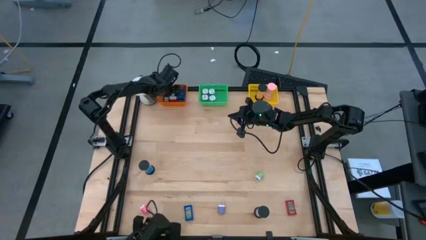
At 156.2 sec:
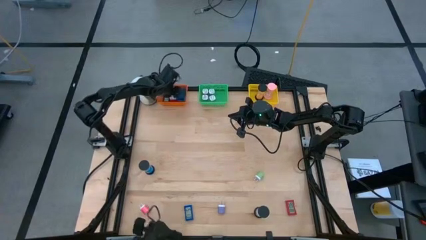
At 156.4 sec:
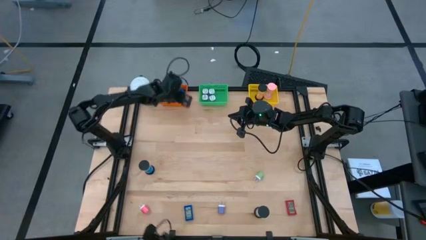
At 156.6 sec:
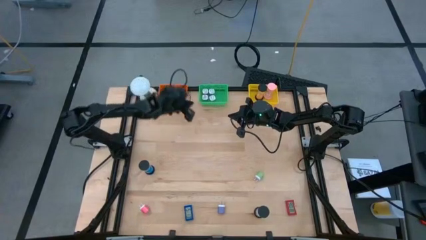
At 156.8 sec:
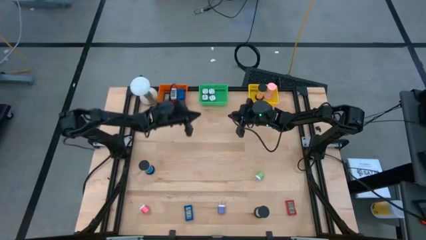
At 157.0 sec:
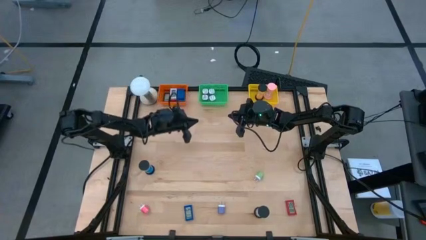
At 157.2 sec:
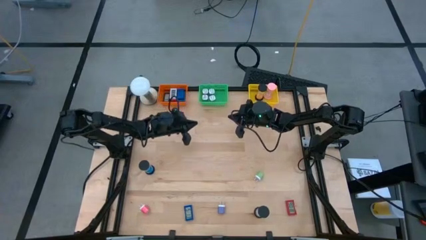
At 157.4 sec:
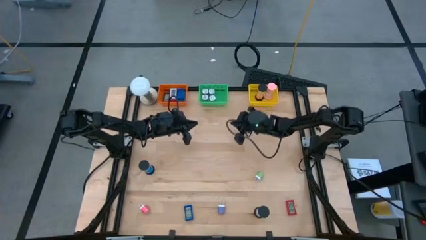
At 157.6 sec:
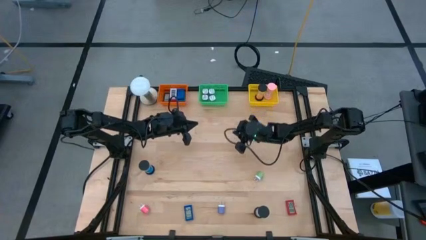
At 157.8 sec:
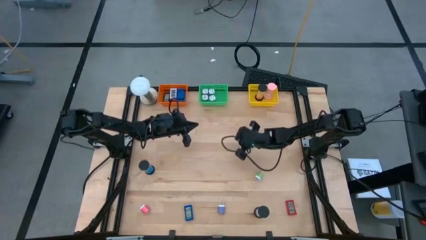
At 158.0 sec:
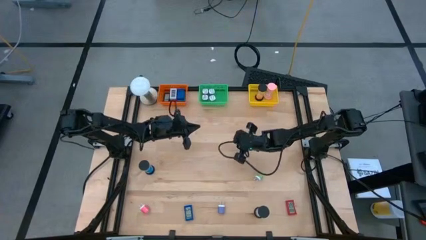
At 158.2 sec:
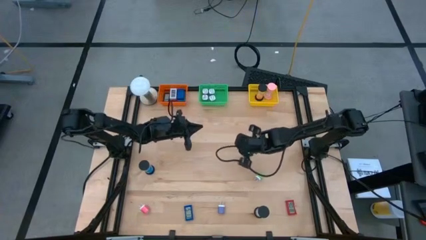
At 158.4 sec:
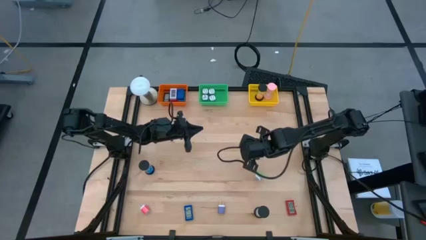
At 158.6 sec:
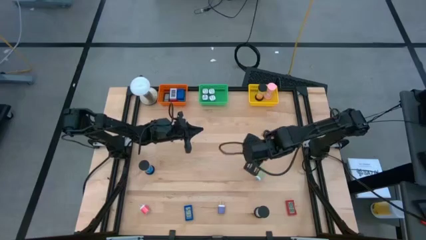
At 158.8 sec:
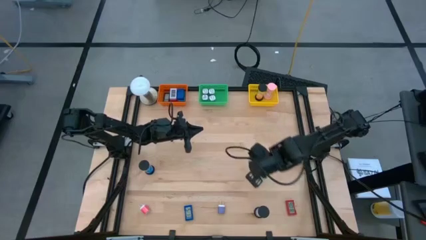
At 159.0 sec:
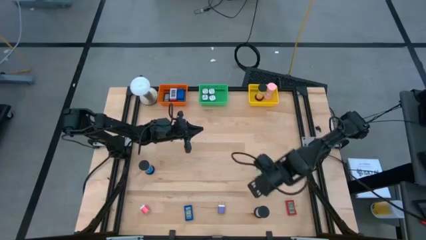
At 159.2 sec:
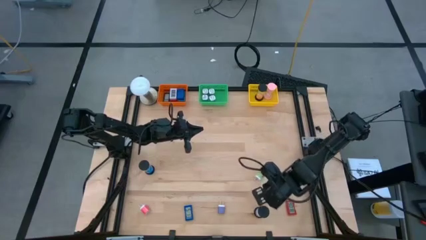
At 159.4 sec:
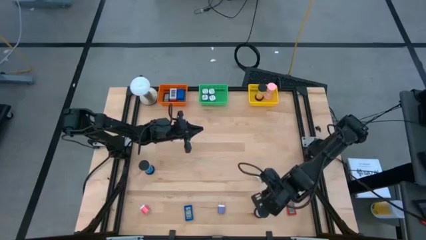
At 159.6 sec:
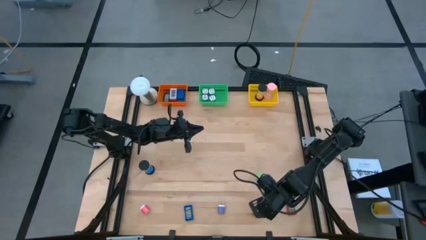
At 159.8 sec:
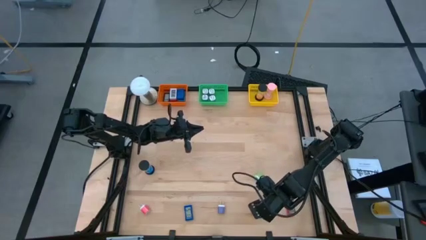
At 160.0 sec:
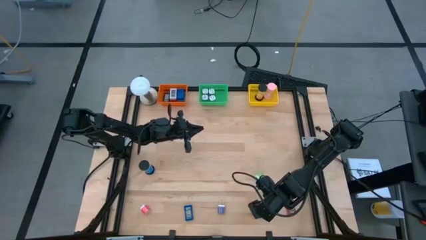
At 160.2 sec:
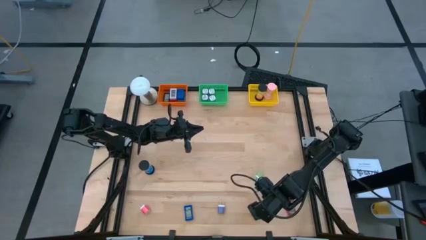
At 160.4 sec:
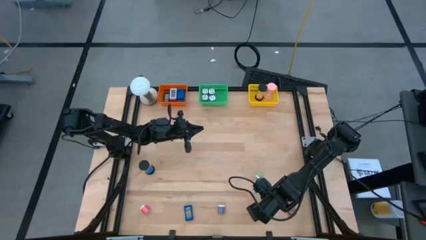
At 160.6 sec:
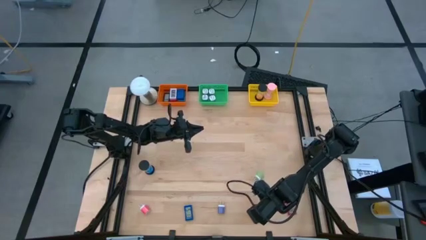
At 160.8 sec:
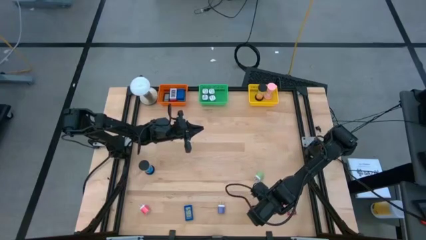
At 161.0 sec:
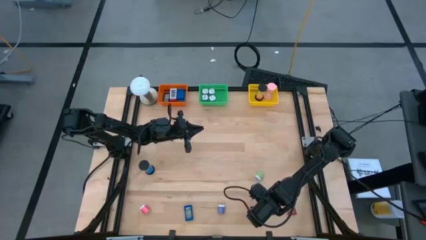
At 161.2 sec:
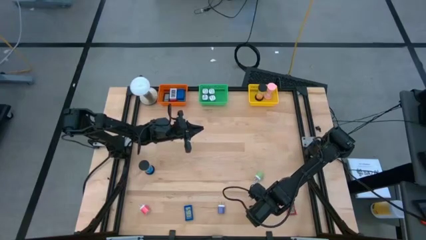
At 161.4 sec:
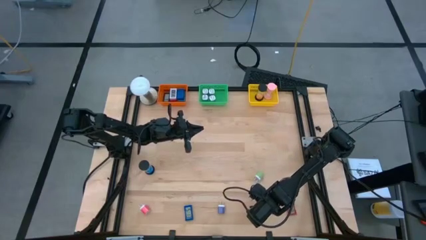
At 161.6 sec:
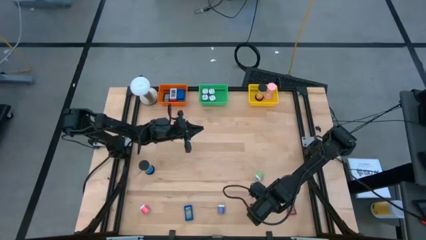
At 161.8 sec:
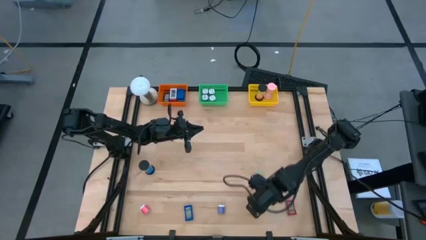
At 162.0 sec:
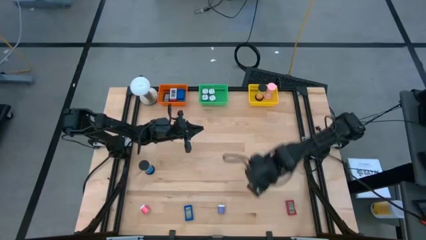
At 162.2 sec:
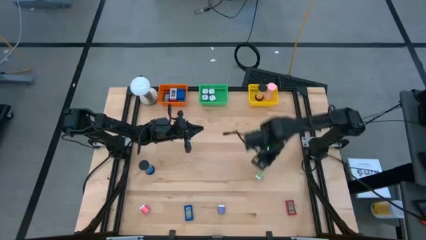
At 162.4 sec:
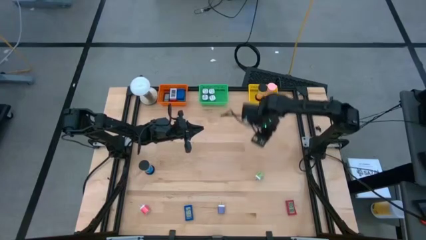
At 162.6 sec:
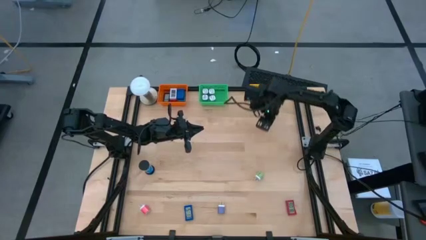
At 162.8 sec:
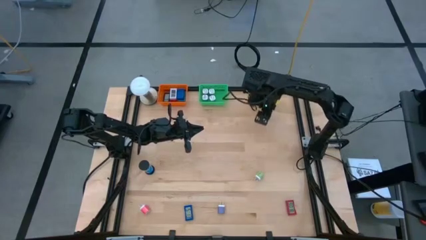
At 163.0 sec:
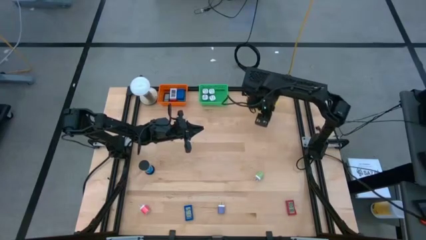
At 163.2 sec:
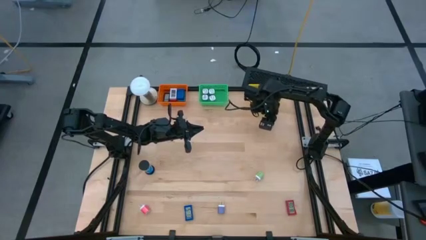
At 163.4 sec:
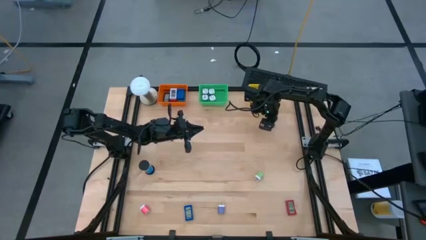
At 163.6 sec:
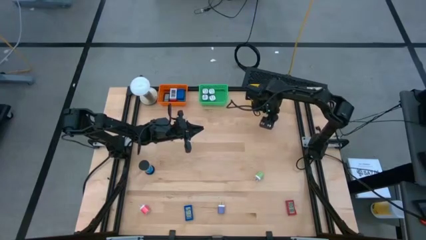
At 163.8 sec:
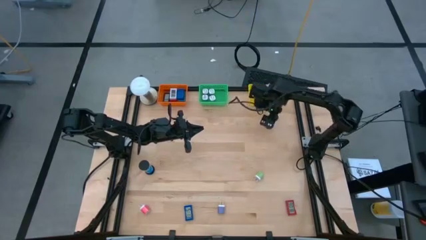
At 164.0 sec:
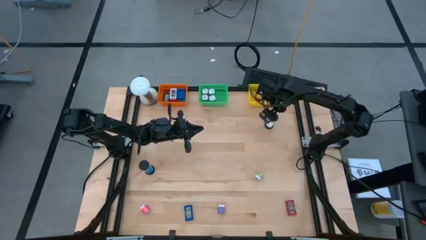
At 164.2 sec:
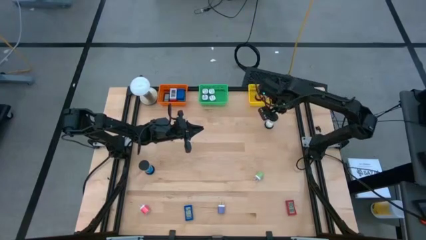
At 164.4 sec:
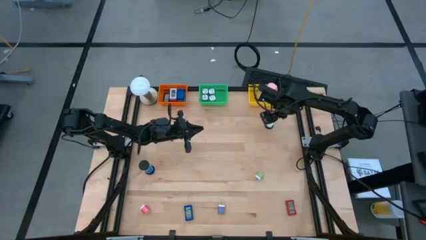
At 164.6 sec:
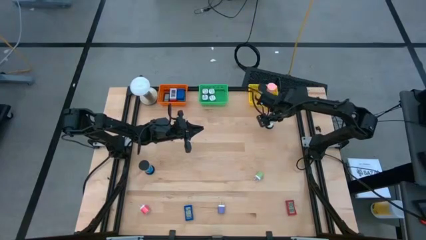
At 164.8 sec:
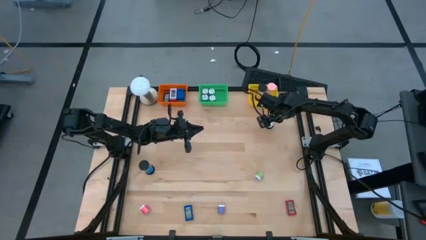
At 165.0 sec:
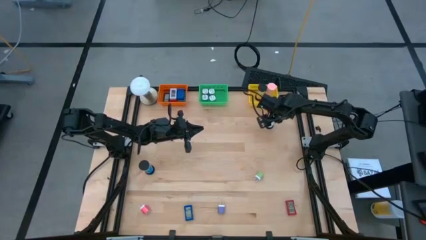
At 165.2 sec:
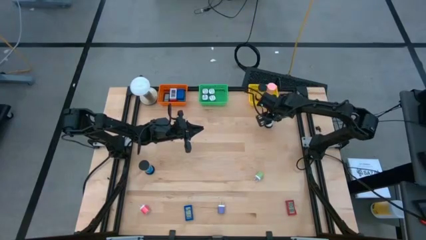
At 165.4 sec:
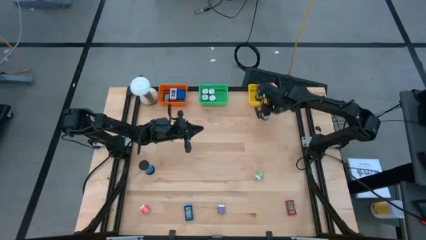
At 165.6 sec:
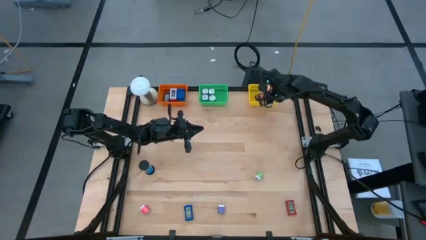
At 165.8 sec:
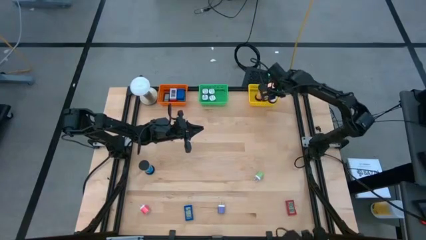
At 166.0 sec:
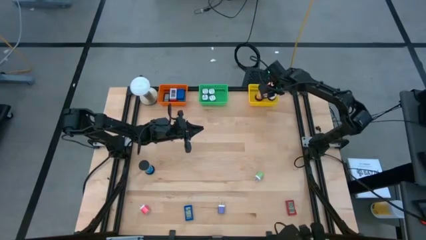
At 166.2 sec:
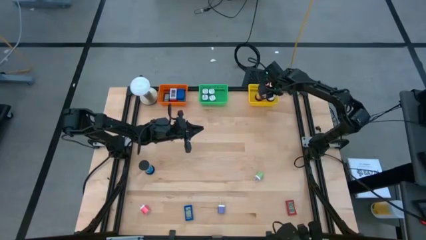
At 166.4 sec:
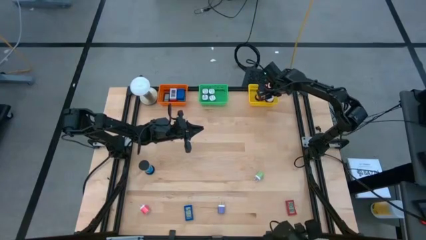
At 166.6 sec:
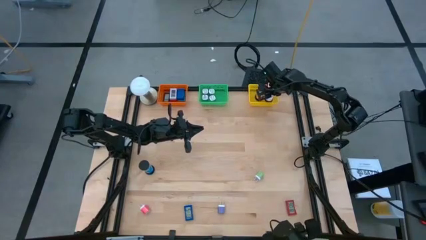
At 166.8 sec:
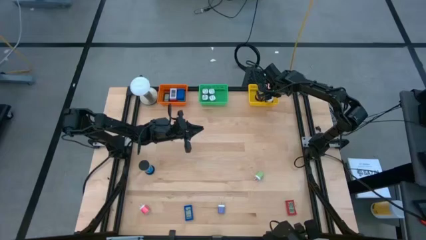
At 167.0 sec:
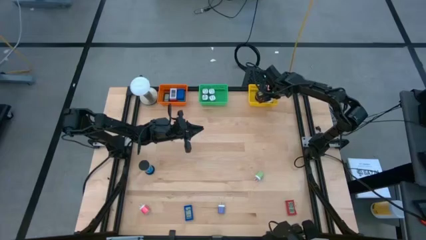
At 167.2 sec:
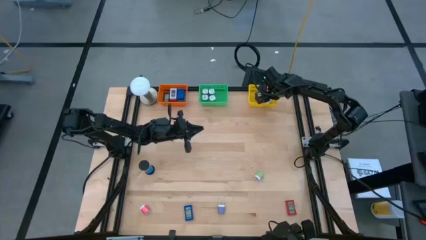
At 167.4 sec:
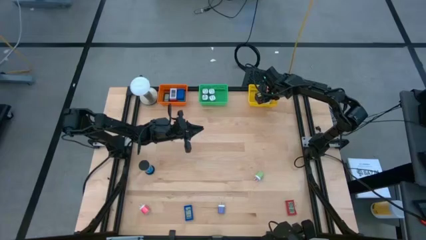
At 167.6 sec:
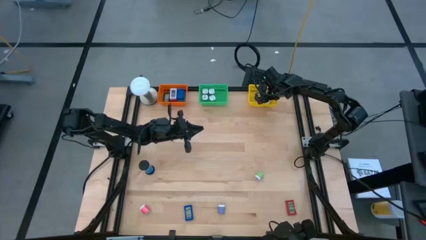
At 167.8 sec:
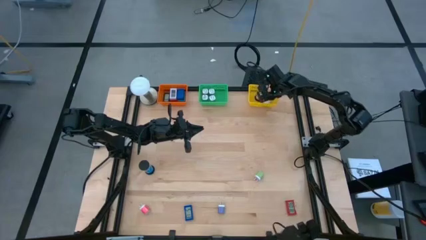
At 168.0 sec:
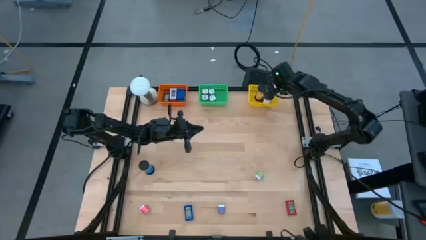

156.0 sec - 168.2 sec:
Task: Pick & Place Office items
Put the white hourglass into the yellow basket

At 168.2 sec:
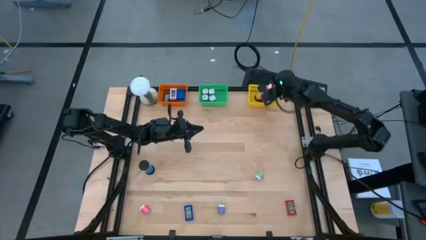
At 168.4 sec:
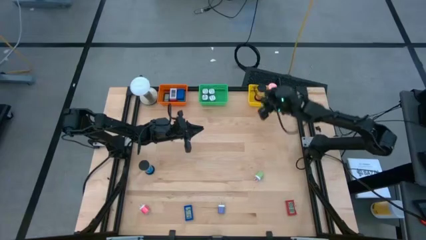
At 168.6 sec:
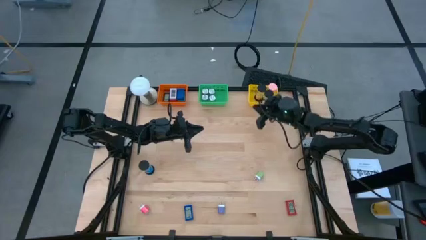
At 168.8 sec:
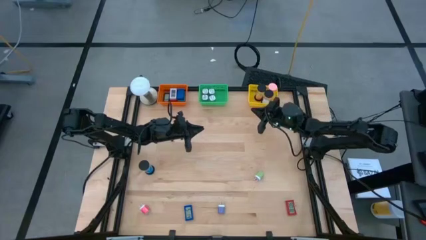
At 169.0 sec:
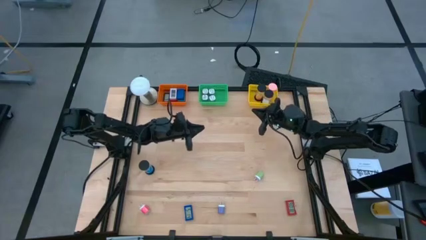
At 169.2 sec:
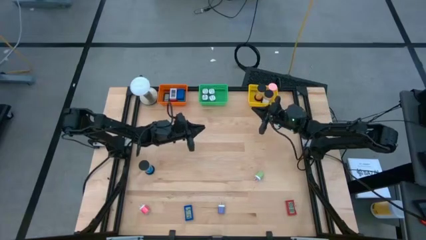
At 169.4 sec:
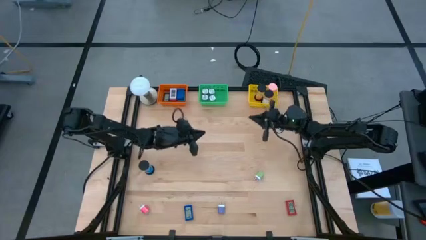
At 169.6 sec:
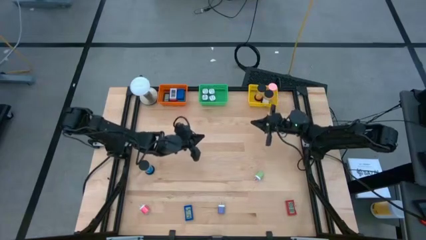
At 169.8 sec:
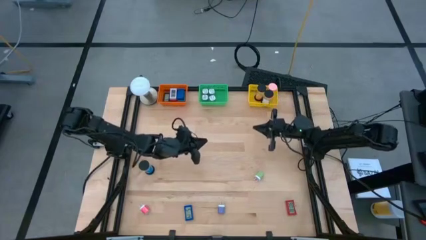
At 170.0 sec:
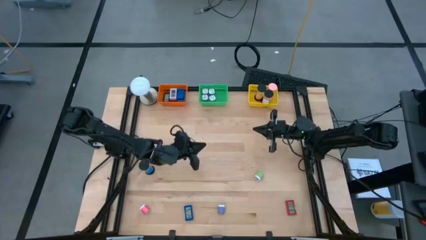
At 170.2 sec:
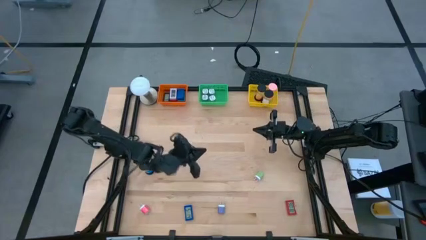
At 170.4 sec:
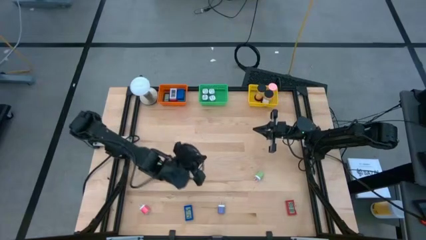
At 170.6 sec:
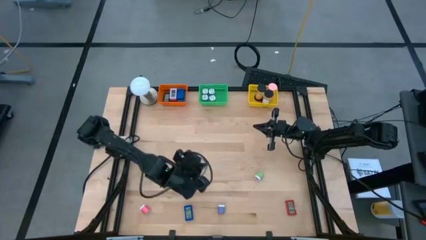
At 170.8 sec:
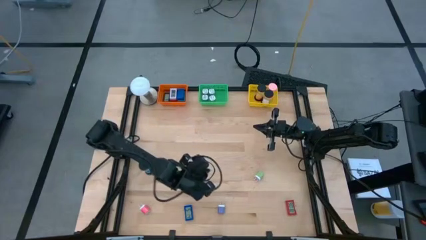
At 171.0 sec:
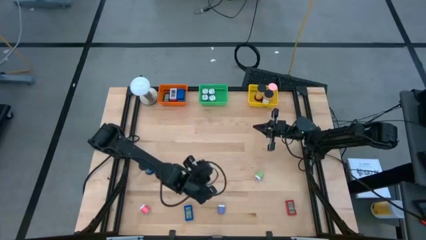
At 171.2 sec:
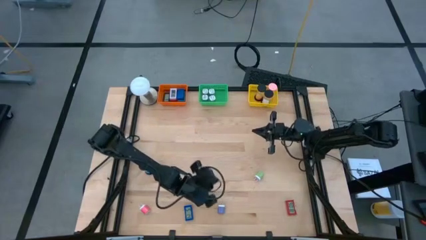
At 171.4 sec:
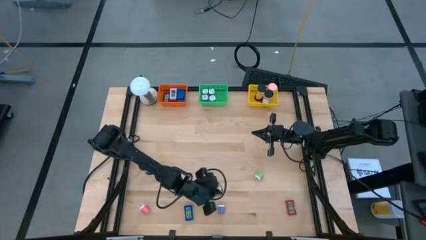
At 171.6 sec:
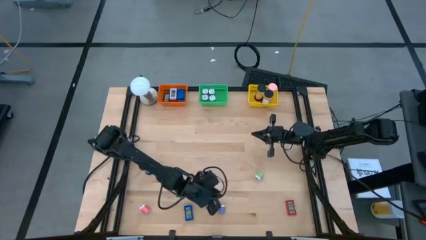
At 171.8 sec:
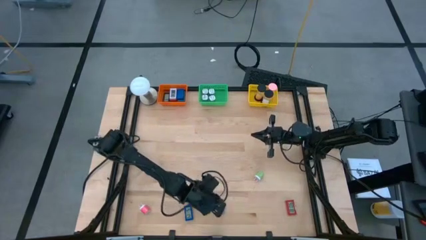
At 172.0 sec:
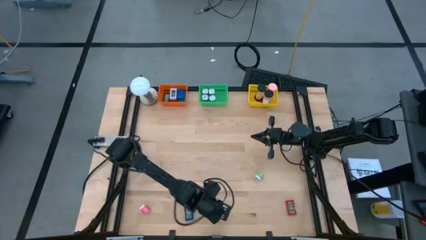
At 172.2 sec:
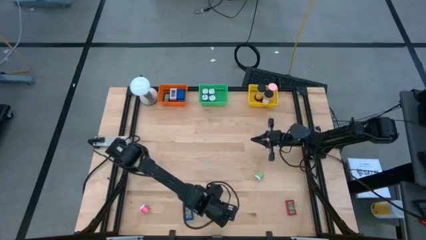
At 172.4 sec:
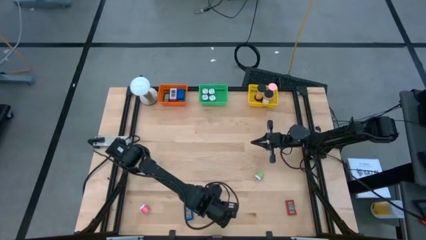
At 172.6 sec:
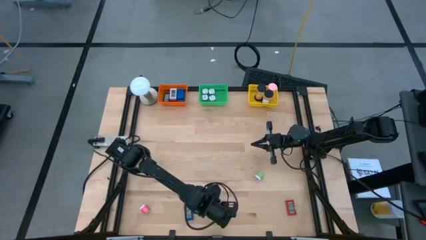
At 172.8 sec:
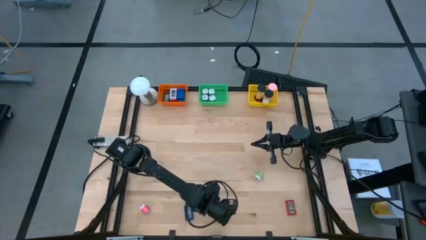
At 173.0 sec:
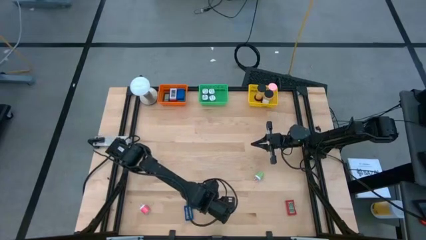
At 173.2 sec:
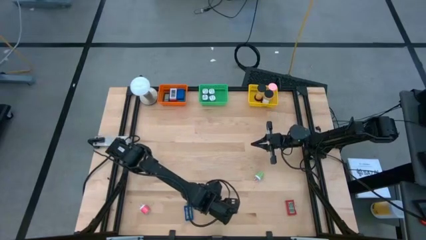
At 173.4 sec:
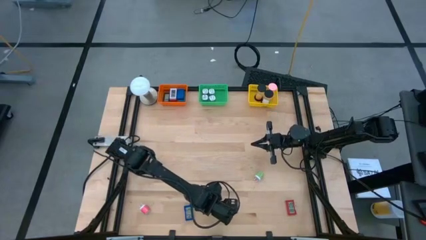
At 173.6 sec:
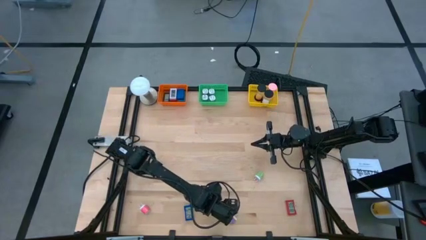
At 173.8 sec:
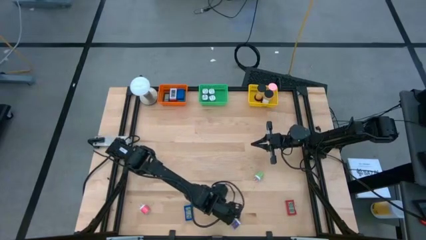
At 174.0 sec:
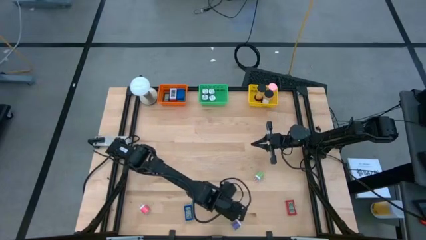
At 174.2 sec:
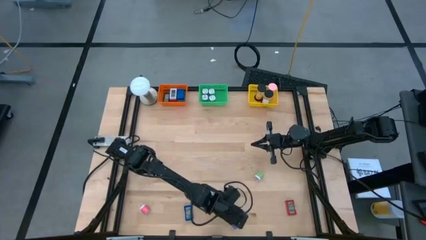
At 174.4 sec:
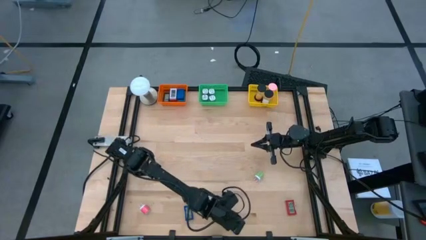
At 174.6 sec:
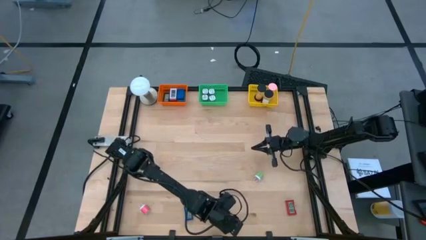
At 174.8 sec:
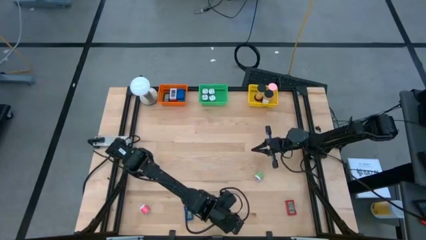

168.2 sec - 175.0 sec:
Put the blue charger adapter into the green basket
